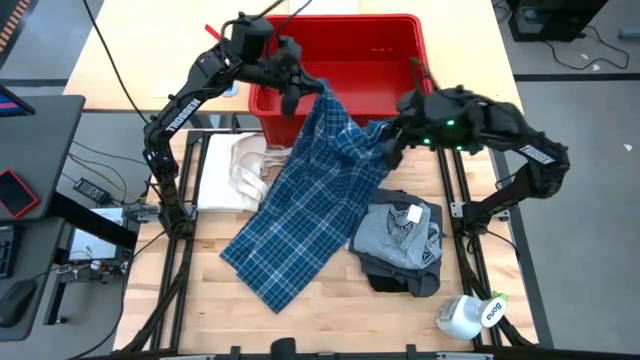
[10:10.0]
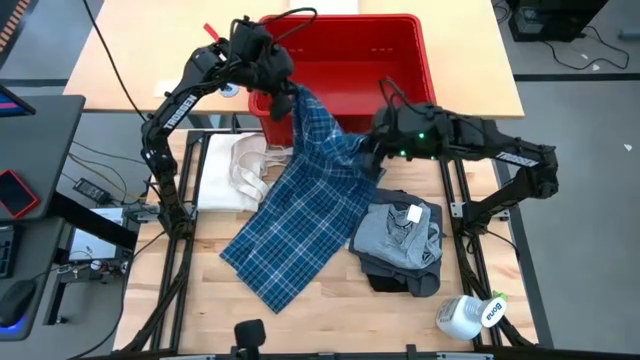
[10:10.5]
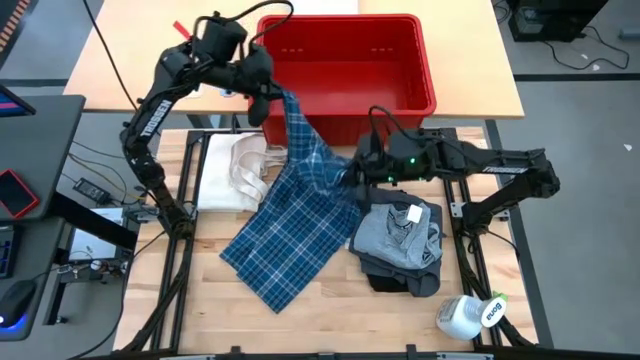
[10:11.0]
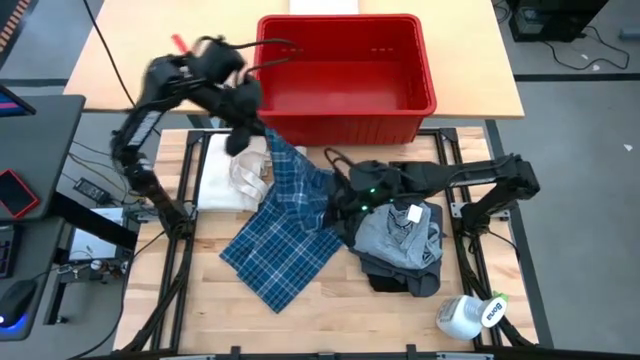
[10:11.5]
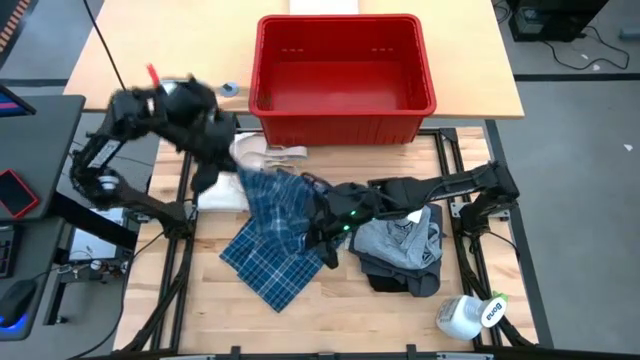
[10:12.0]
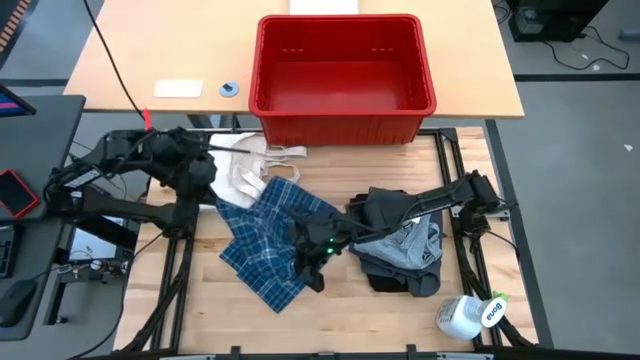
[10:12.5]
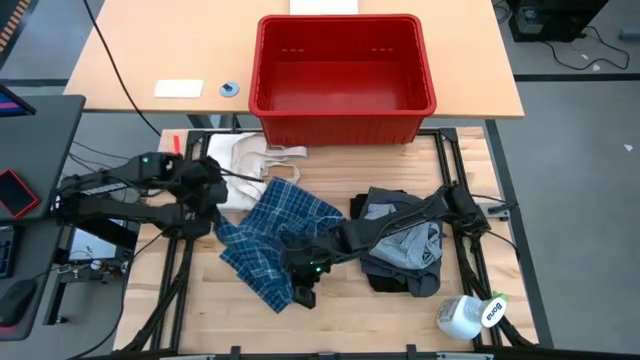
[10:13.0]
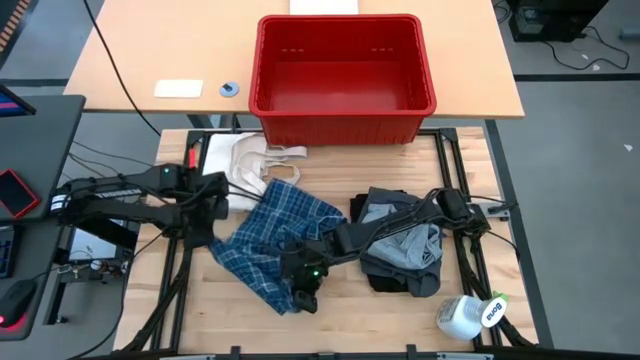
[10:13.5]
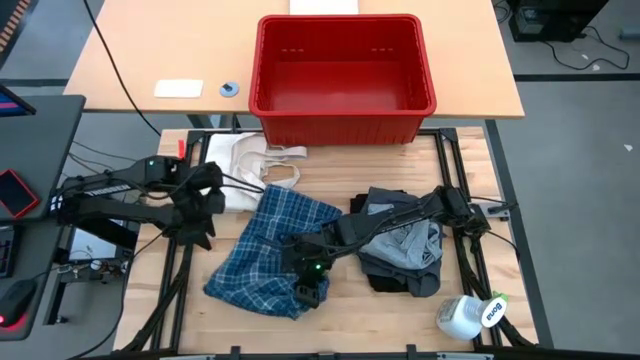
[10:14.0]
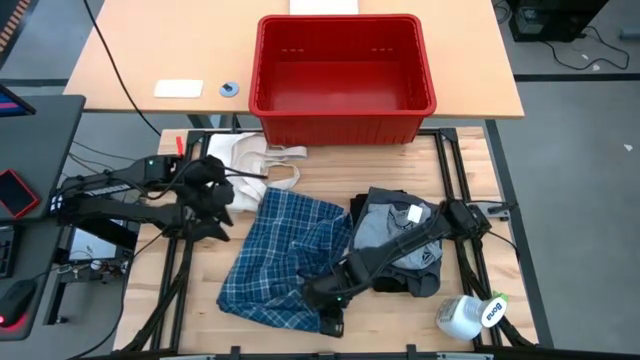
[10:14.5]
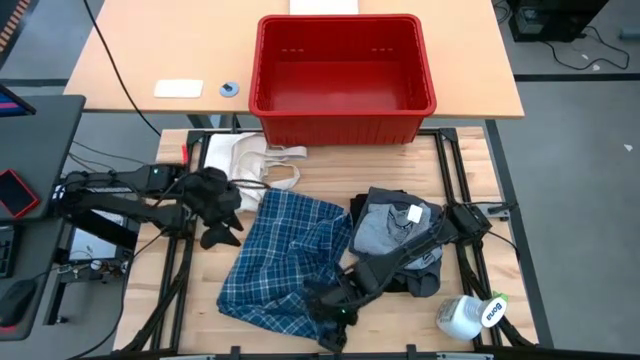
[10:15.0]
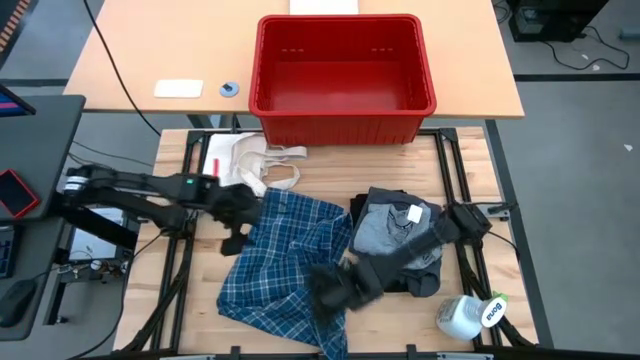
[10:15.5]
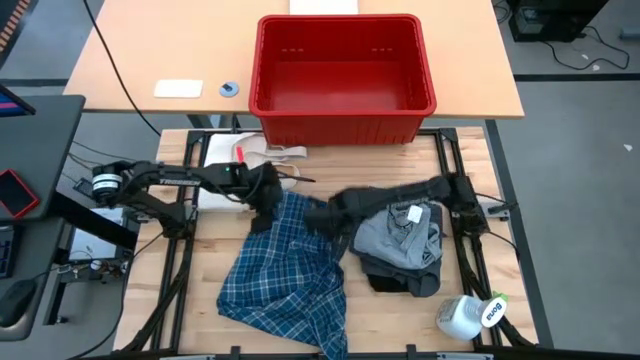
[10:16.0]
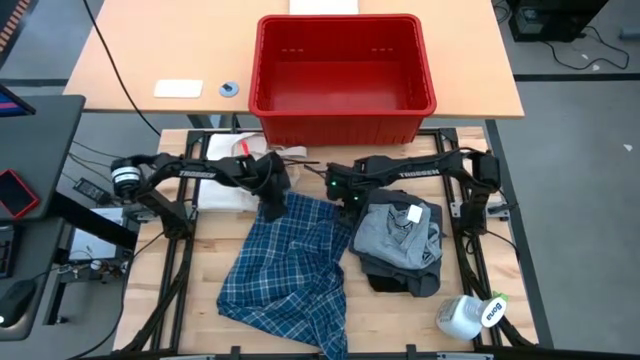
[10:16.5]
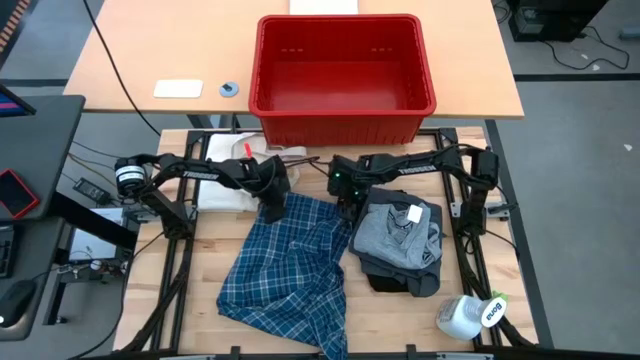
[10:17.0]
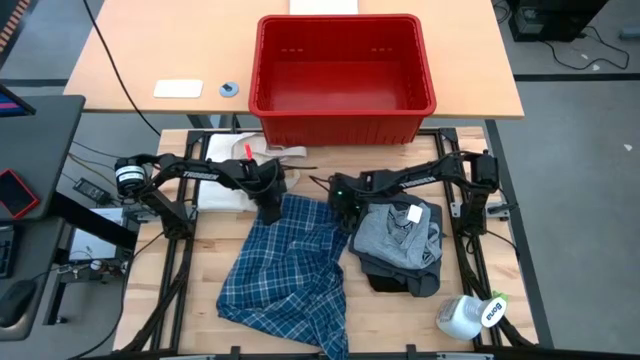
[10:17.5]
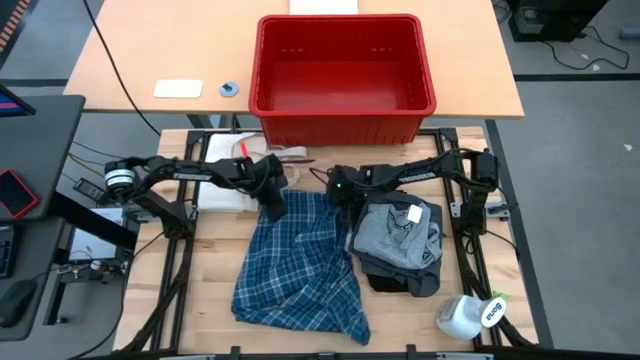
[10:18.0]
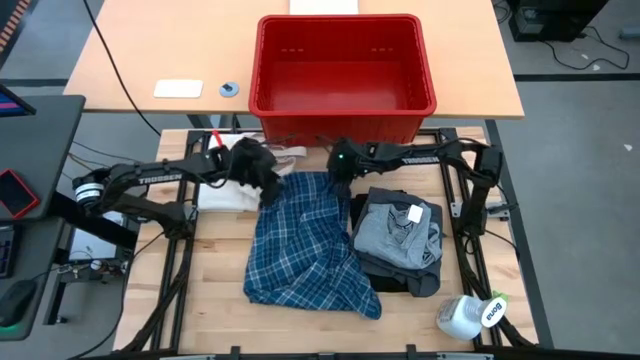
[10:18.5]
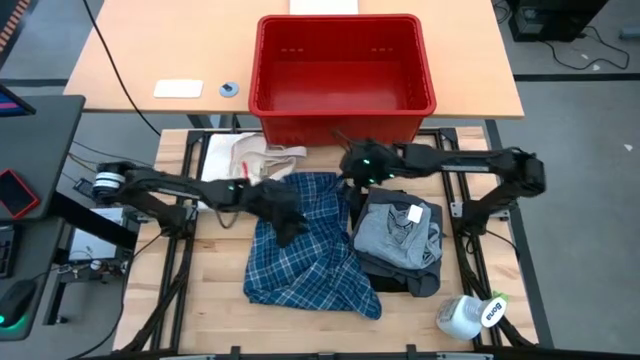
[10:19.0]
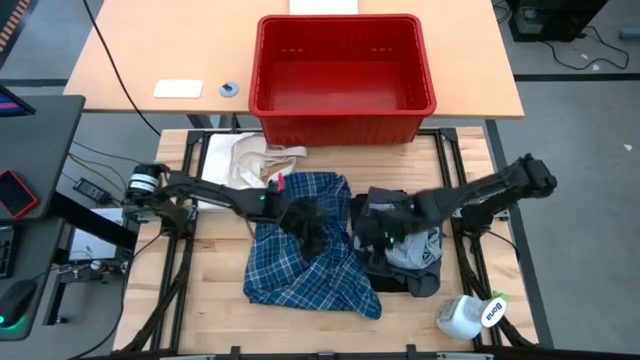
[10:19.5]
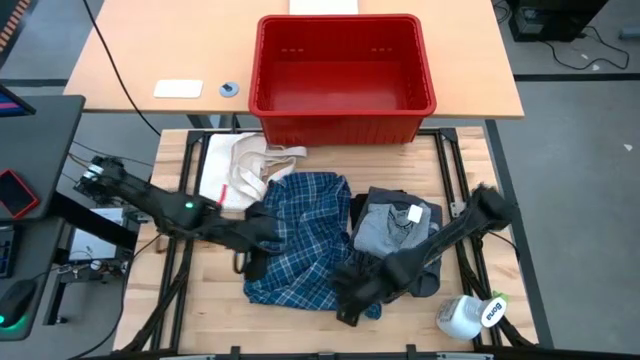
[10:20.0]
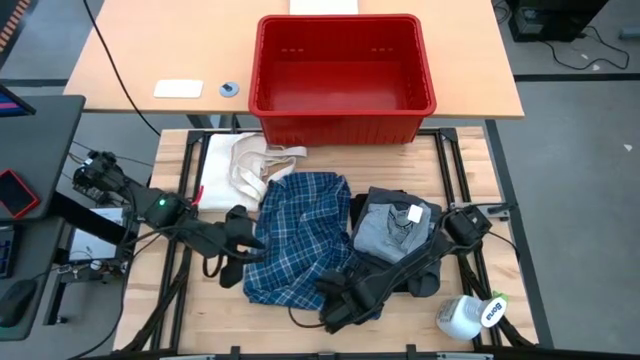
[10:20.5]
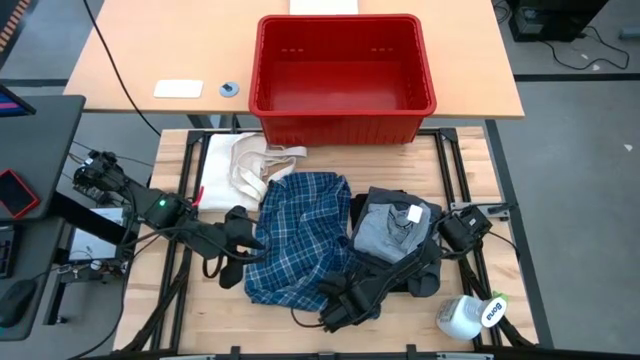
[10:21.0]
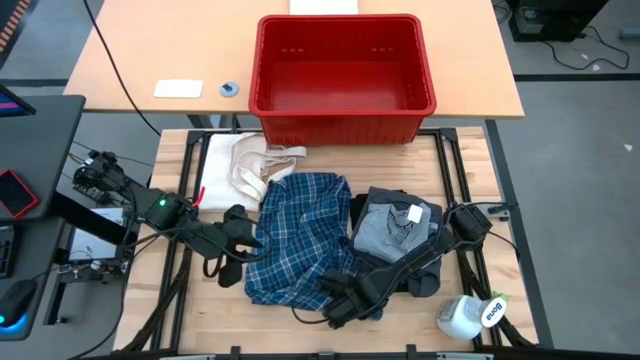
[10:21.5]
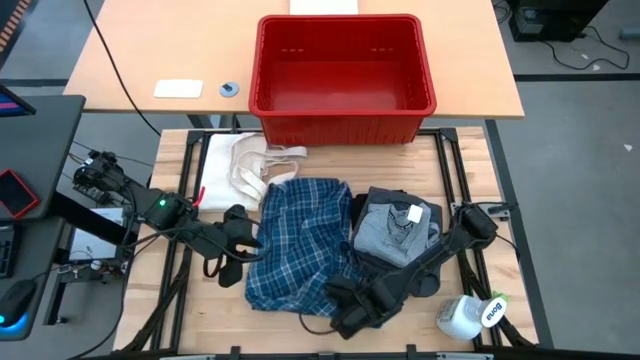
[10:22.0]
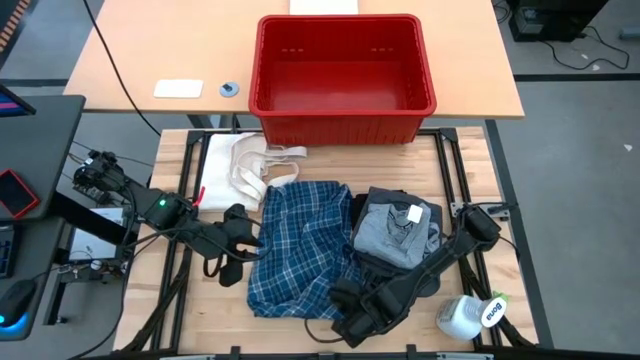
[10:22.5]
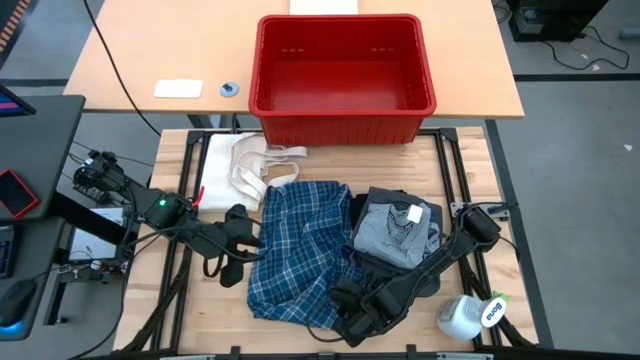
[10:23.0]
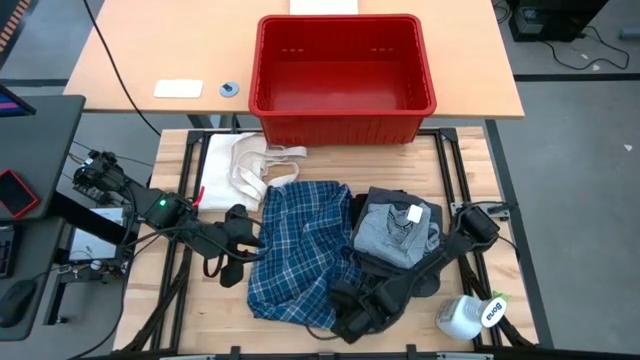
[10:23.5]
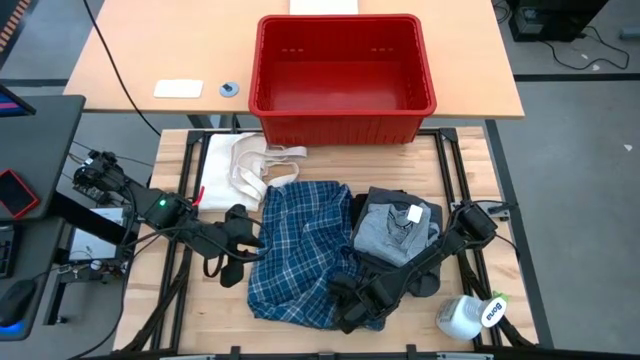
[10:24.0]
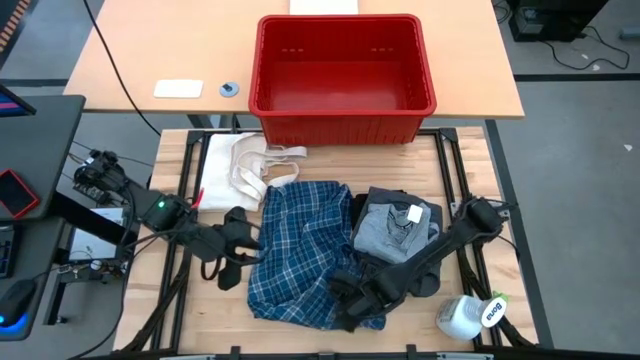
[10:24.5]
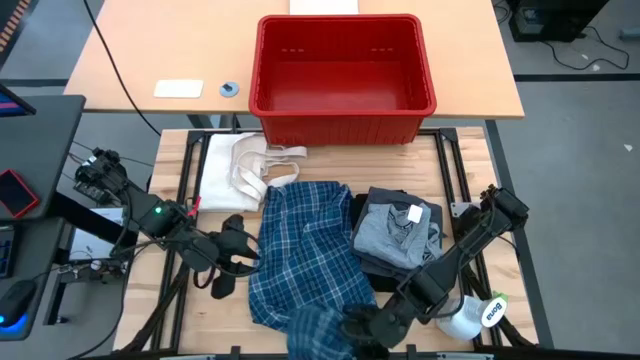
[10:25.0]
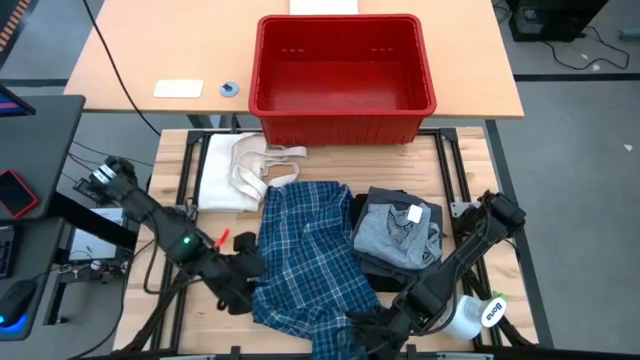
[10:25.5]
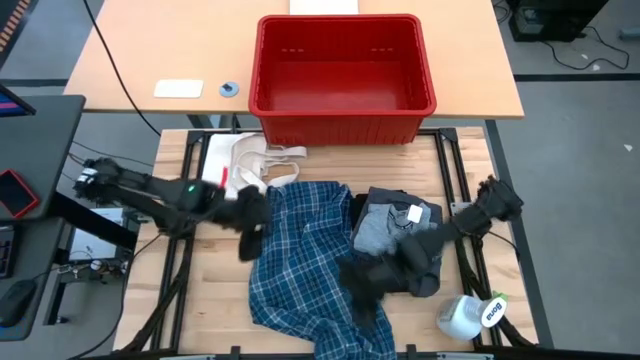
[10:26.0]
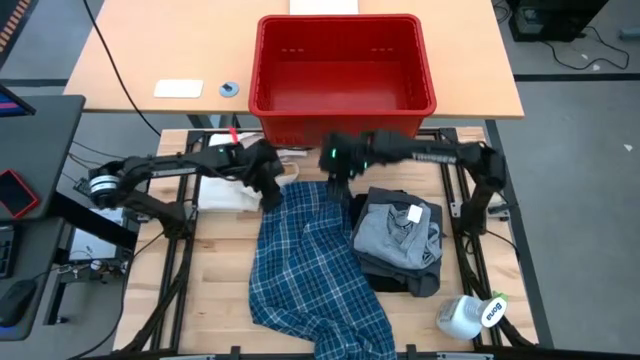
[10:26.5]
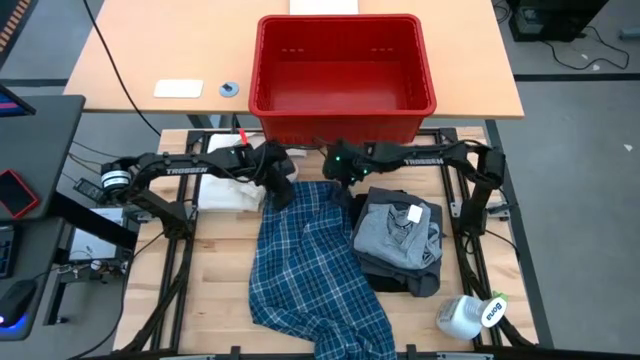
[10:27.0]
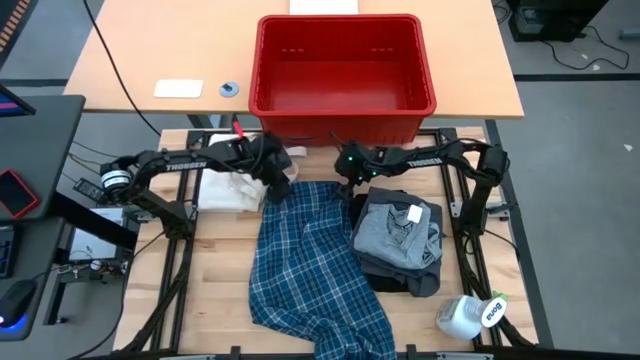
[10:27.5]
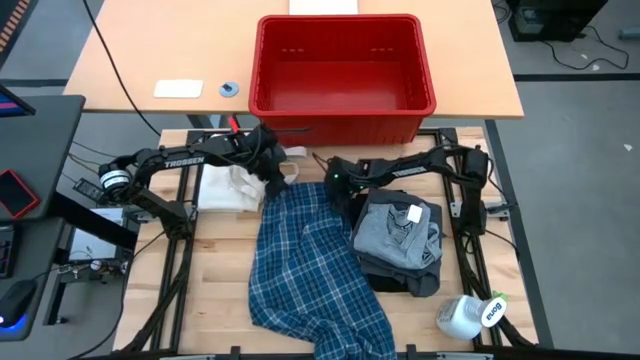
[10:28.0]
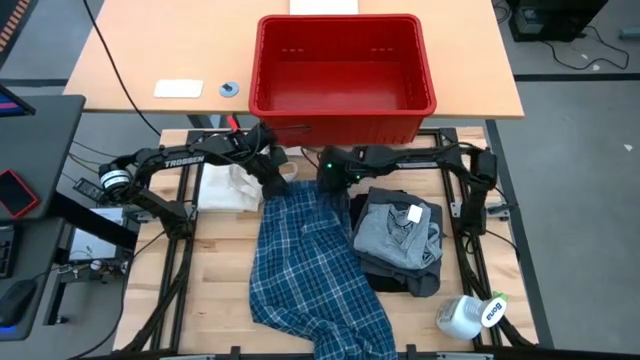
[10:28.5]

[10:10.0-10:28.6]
Task: Fold Laundry from Bin
Fold the blue checkered pants

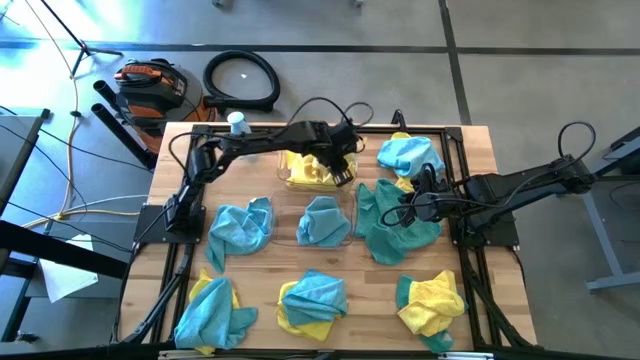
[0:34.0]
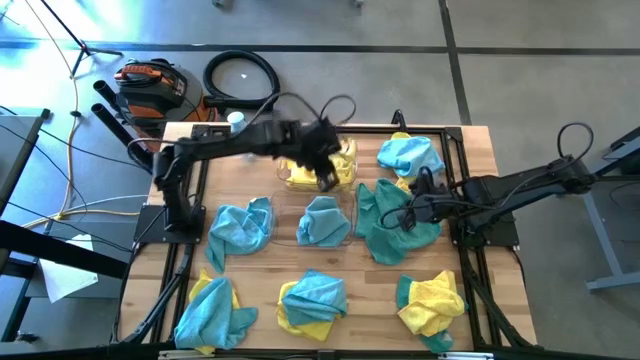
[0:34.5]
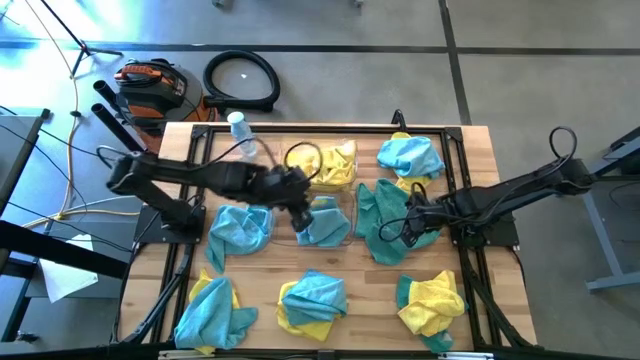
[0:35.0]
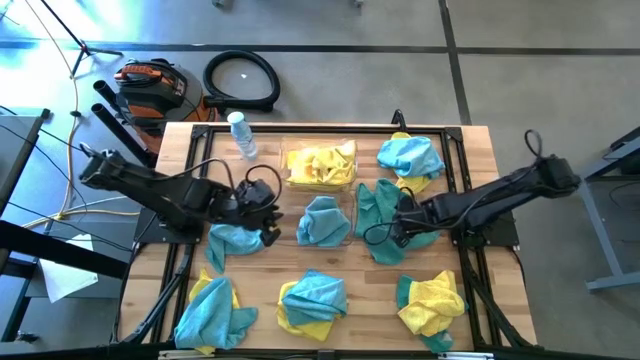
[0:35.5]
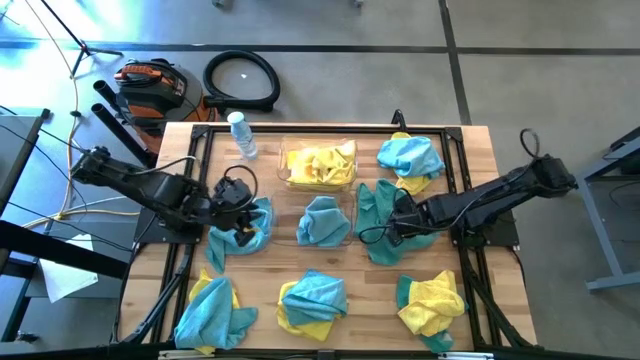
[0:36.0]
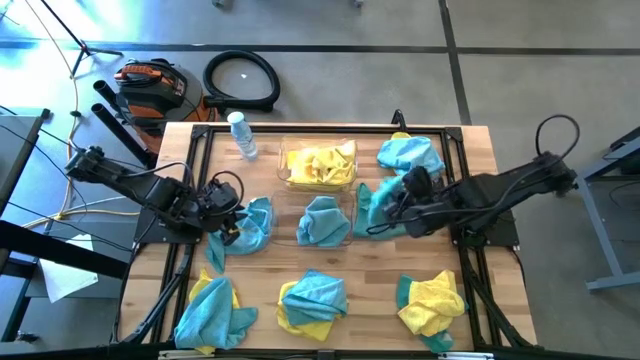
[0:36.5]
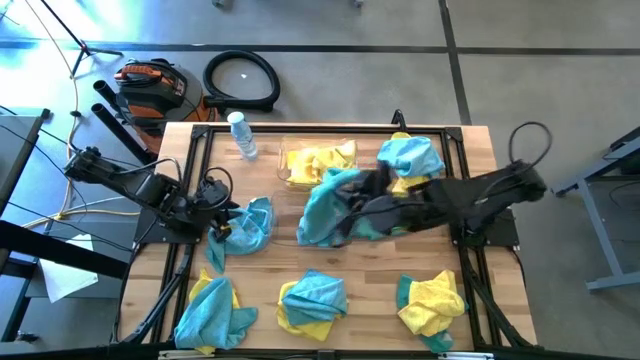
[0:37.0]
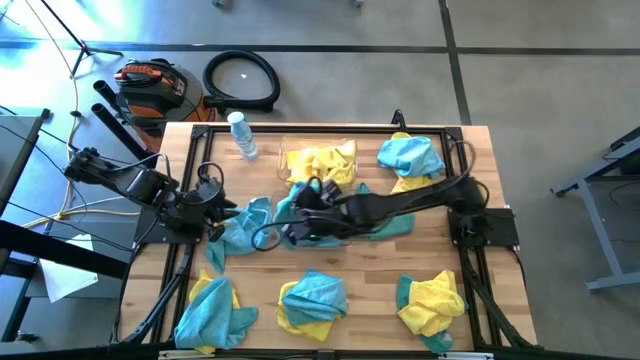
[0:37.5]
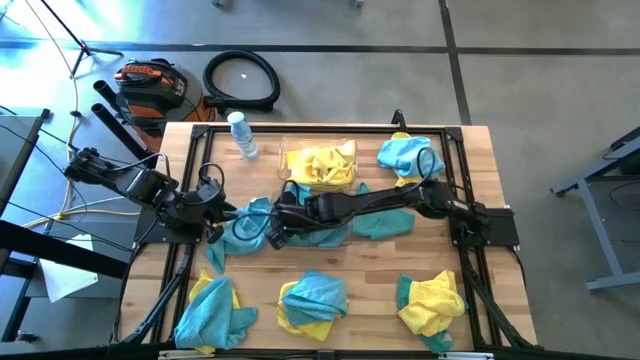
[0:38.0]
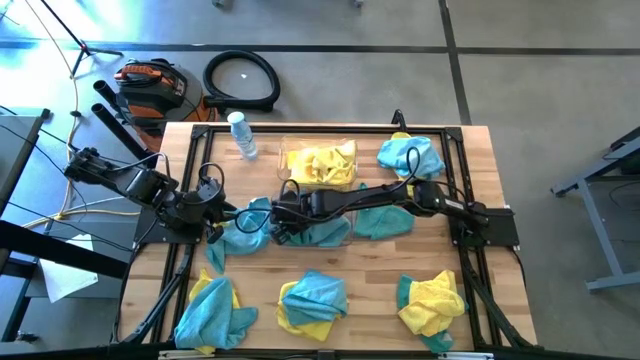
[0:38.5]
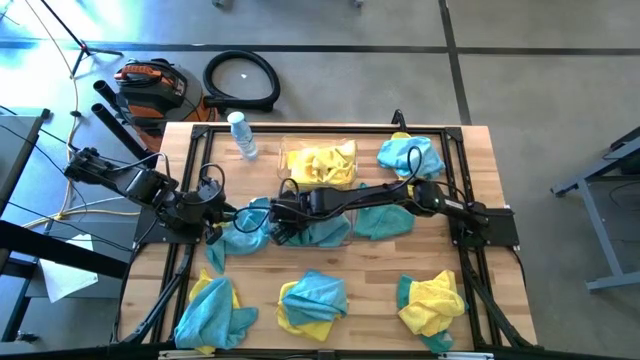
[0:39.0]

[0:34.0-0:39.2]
Task: Sort microfiber towel by color & place in baskets
Put the blue microfiber cloth into the bottom transparent bin
